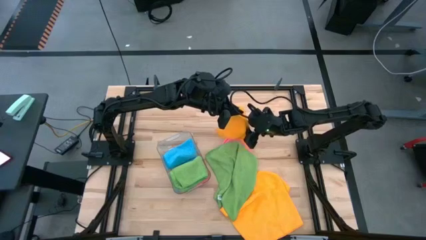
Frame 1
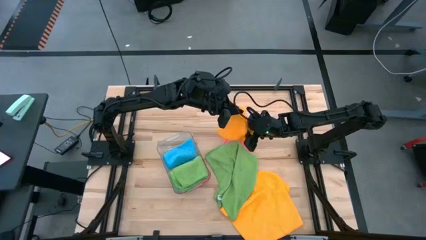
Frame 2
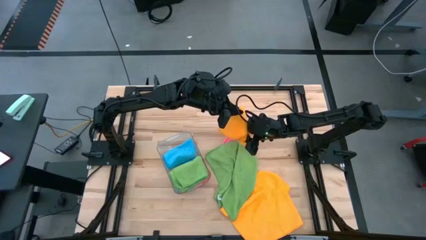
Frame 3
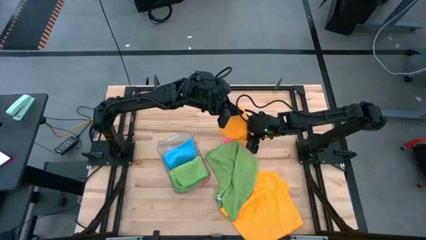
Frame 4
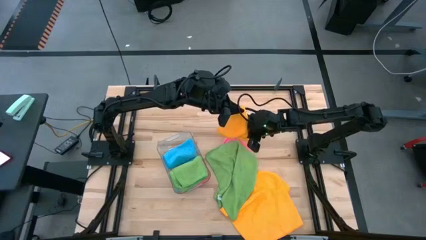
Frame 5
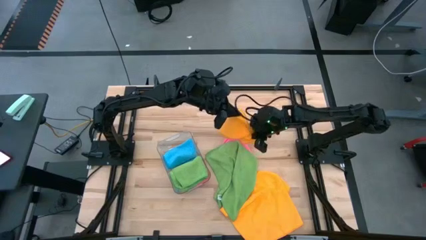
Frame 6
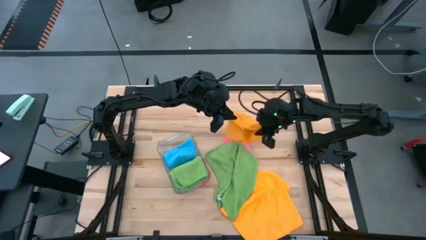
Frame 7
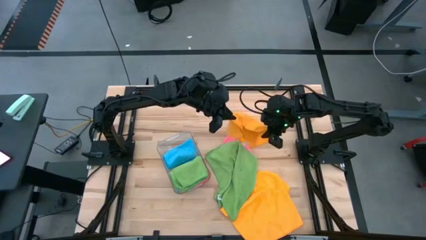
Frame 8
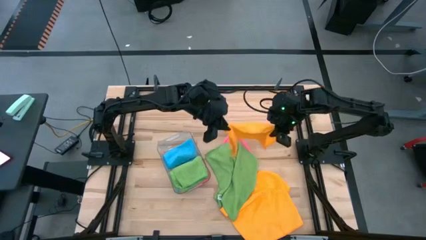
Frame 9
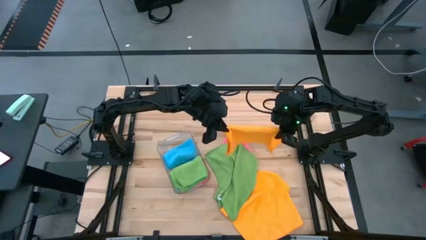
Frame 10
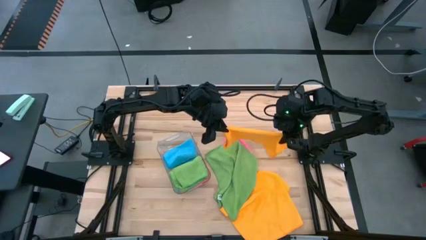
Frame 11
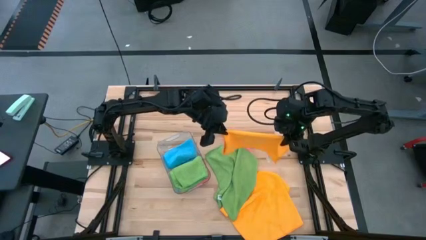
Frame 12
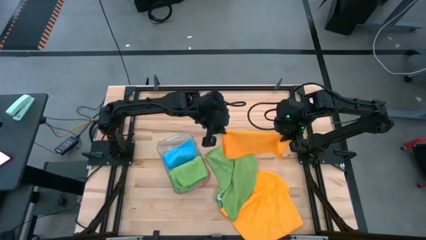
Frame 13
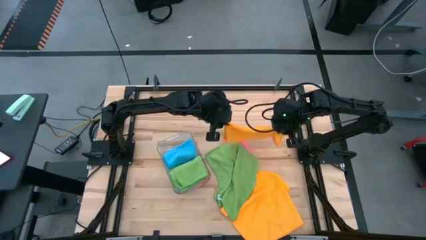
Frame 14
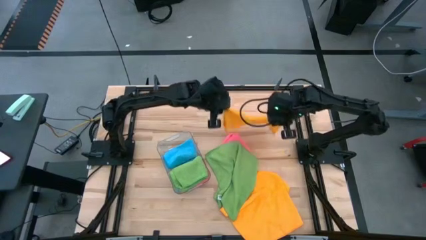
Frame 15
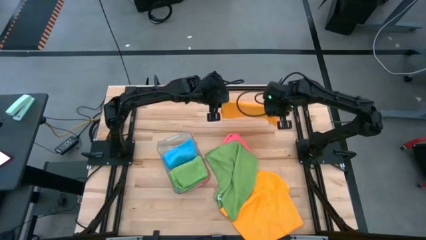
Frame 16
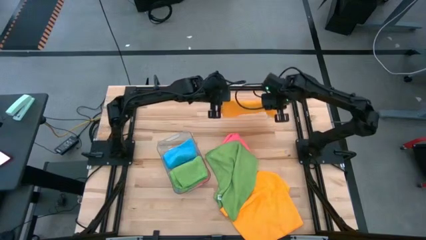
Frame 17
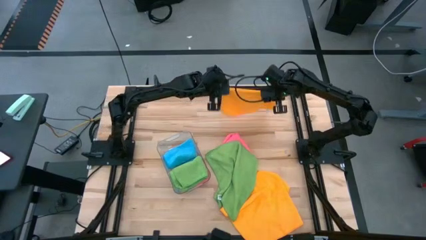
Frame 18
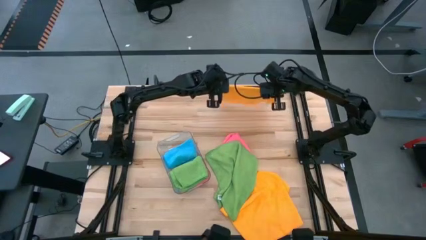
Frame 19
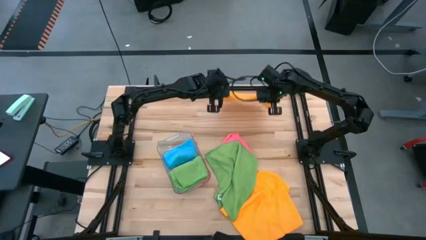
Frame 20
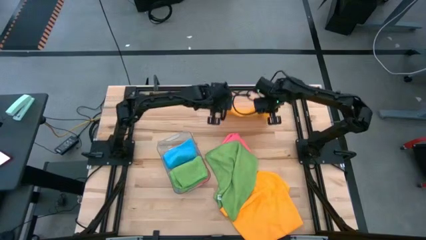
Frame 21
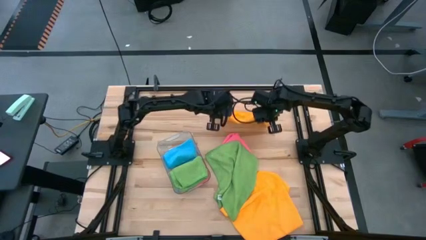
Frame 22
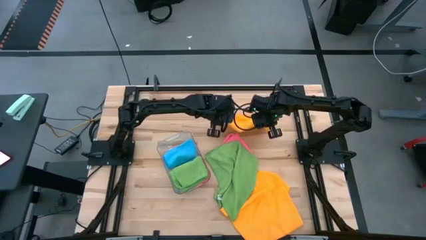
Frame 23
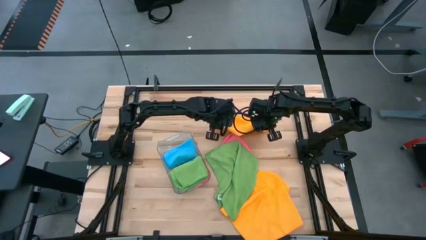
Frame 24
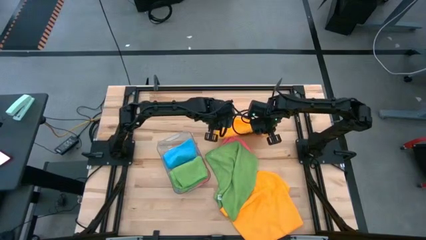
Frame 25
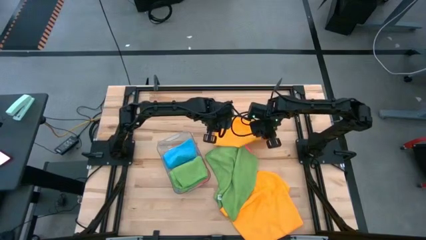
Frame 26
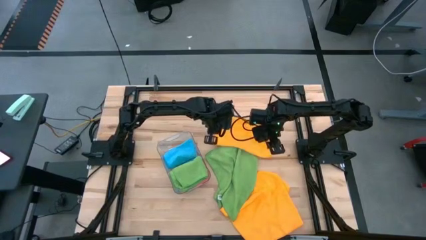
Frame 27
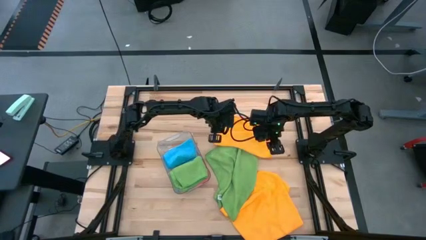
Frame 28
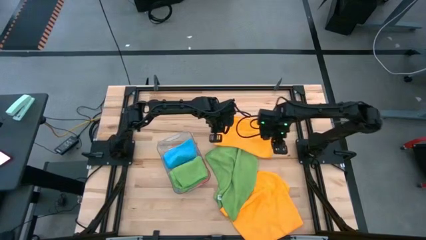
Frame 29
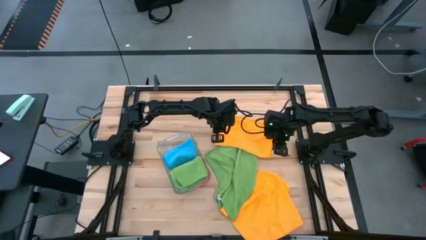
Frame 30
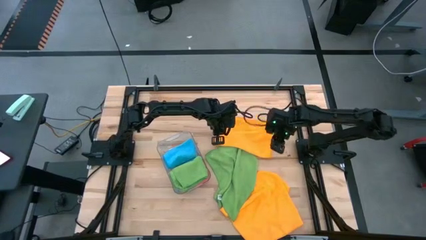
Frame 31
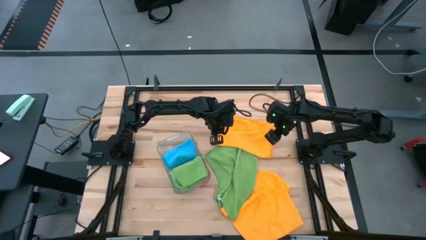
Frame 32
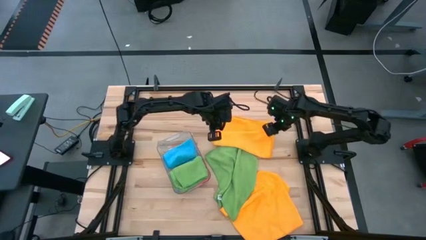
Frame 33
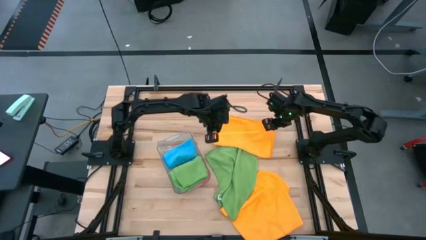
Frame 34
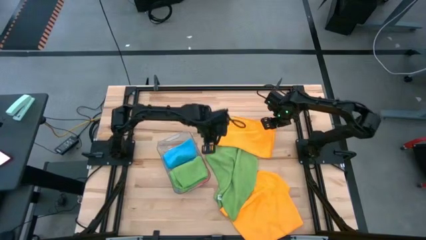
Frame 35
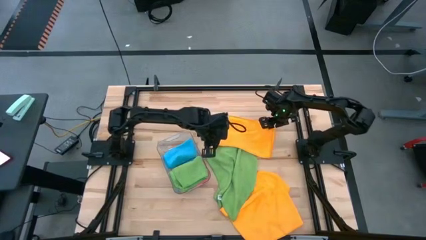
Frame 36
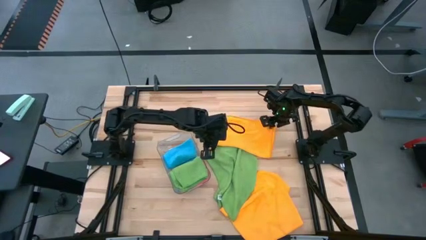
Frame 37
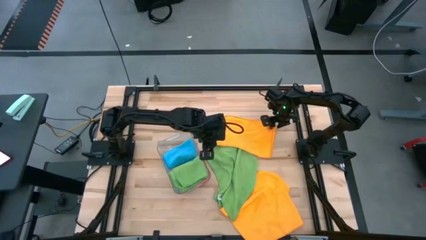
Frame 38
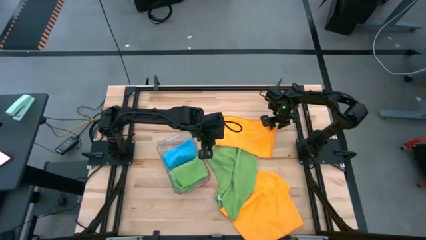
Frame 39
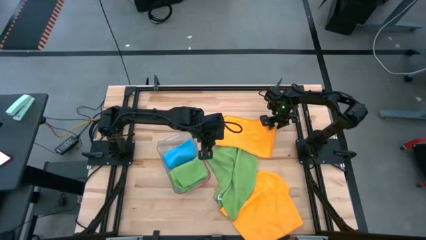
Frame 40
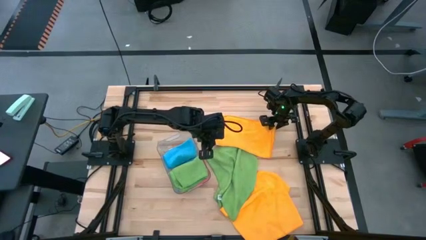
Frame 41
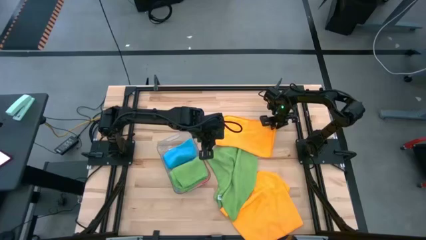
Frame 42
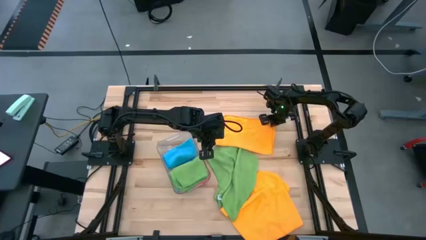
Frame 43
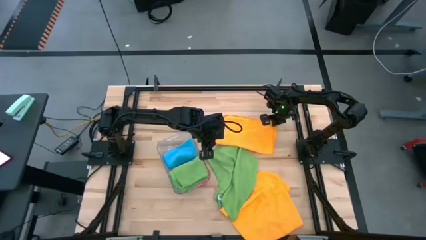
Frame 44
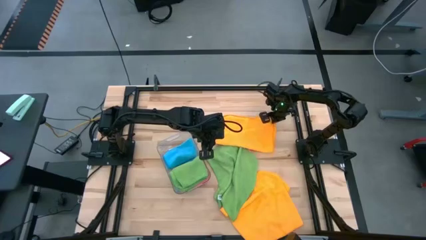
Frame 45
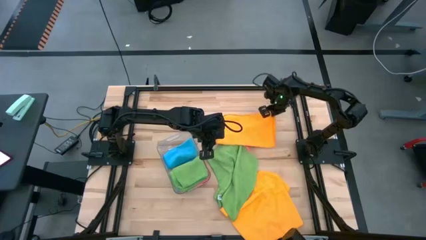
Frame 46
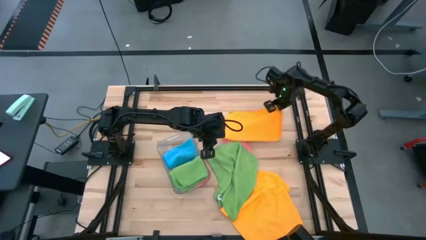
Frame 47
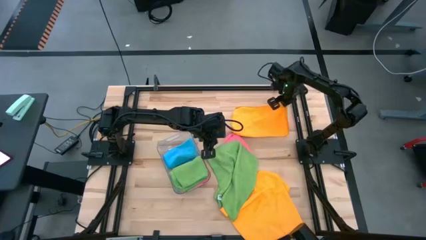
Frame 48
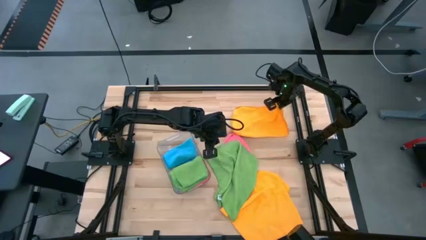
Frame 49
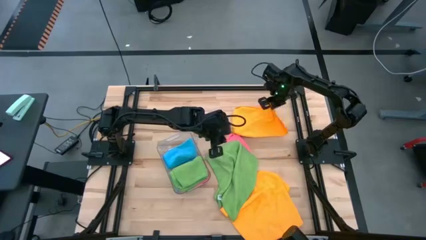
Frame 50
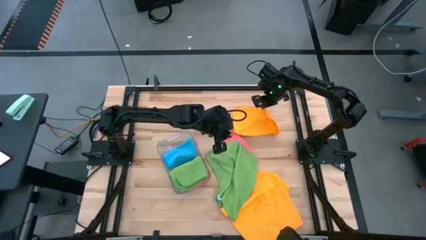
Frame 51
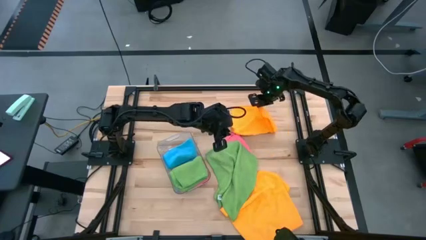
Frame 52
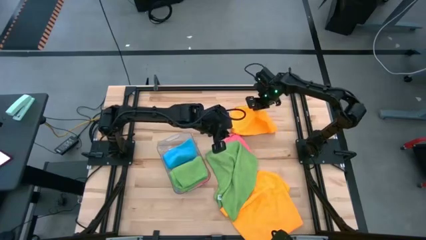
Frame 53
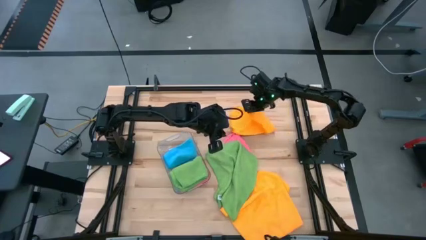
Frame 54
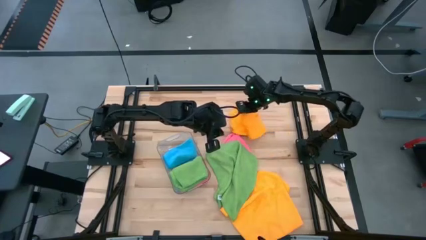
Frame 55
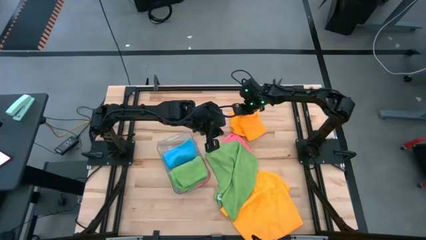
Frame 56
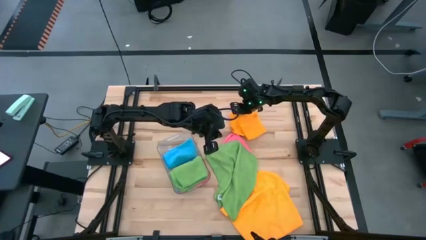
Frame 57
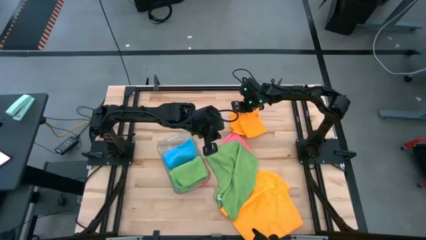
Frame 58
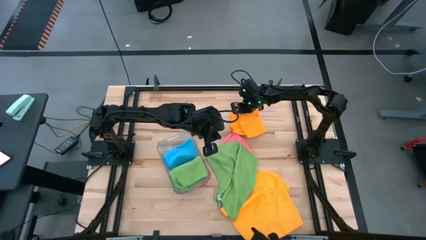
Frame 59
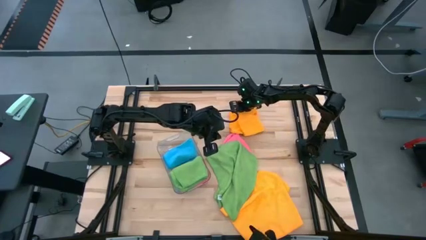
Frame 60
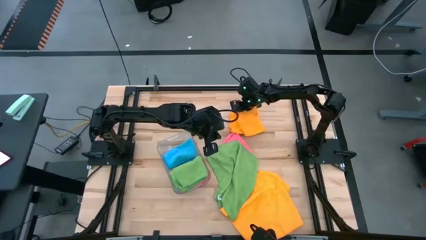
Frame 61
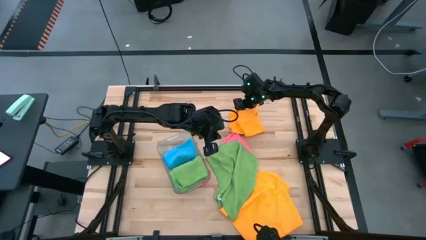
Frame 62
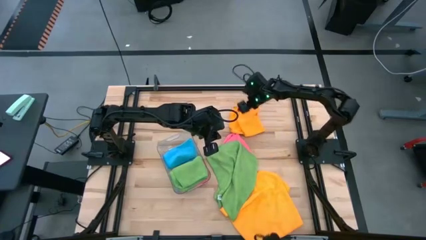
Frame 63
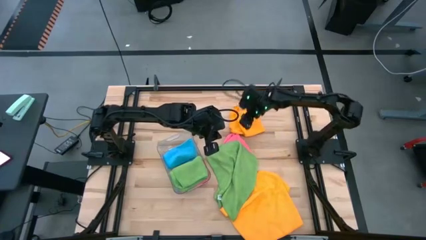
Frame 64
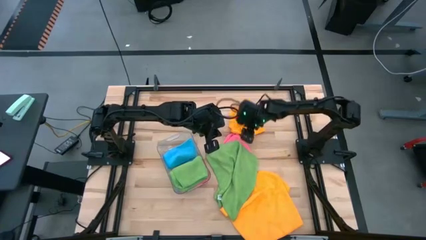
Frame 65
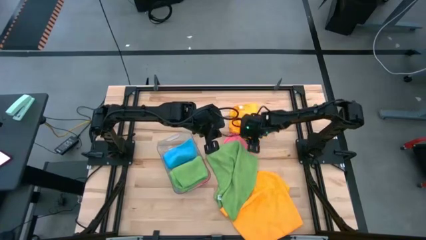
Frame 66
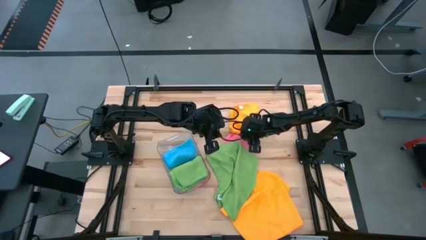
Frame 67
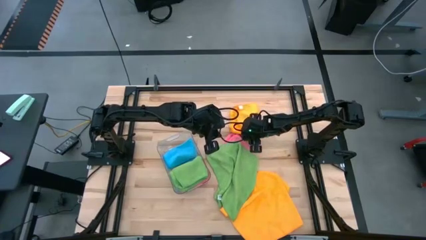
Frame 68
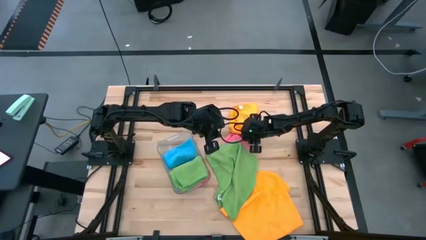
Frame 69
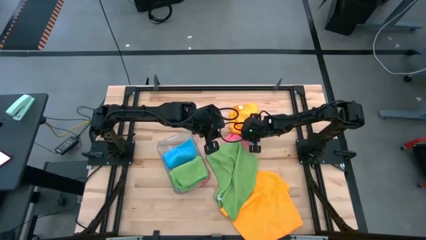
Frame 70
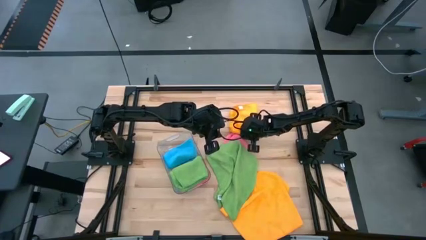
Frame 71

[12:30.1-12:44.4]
Task: Fold microfiber towels
Fold the left yellow towel
